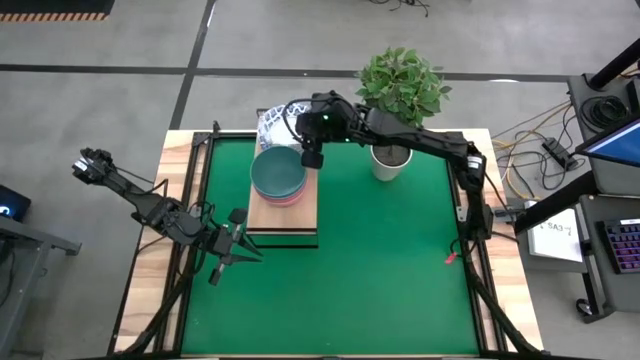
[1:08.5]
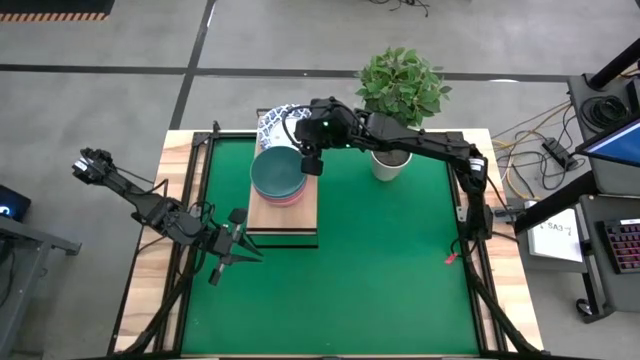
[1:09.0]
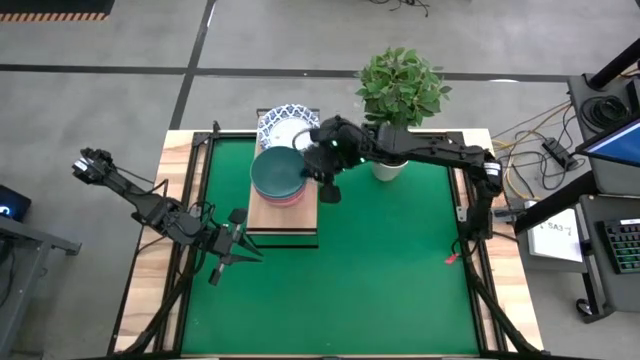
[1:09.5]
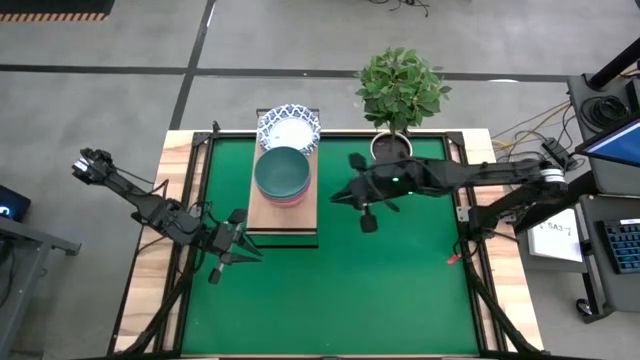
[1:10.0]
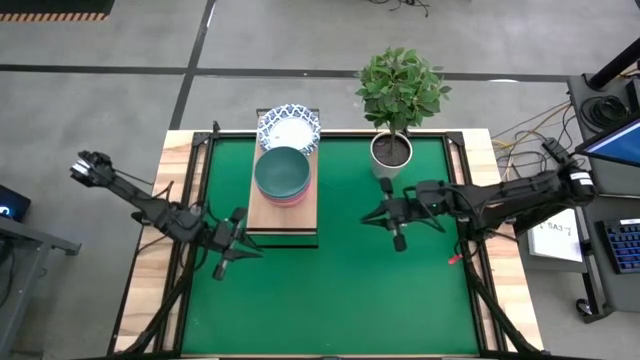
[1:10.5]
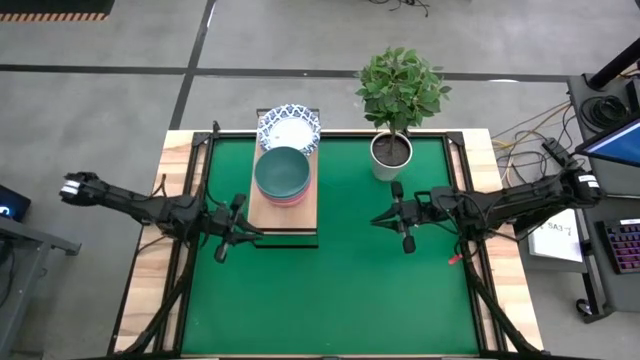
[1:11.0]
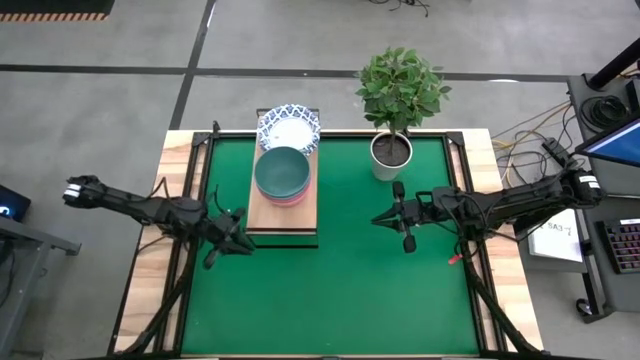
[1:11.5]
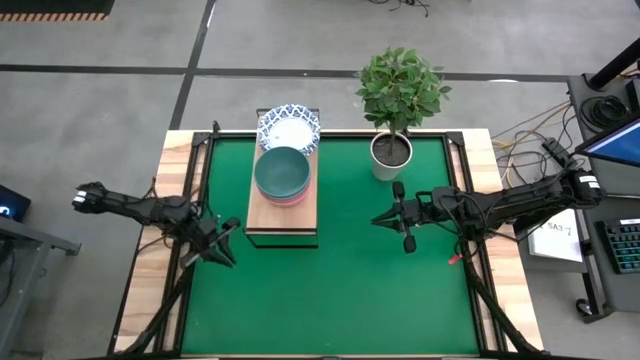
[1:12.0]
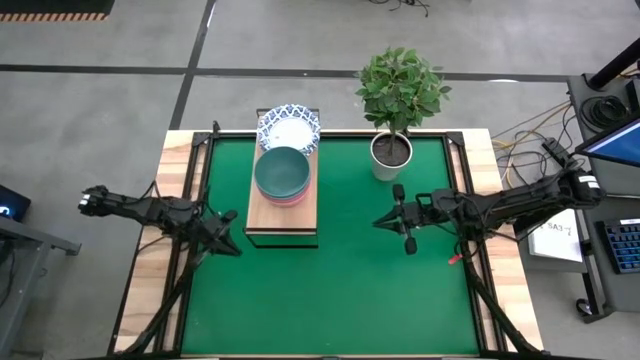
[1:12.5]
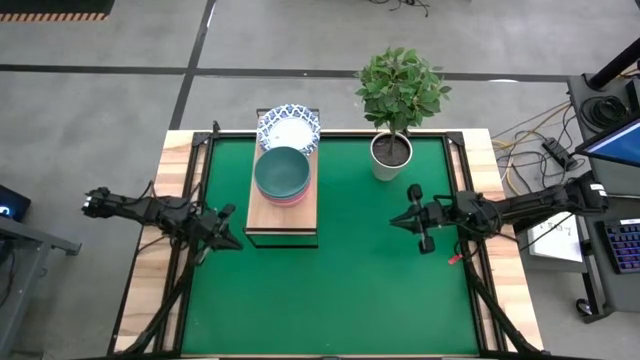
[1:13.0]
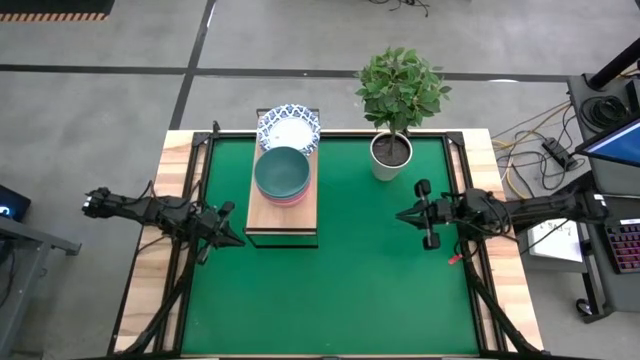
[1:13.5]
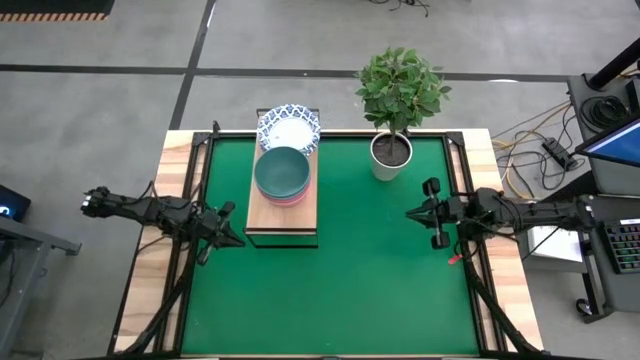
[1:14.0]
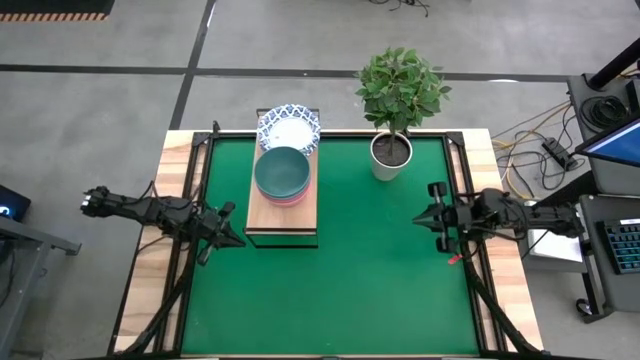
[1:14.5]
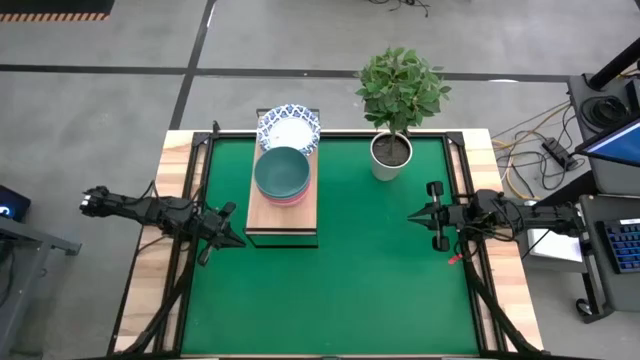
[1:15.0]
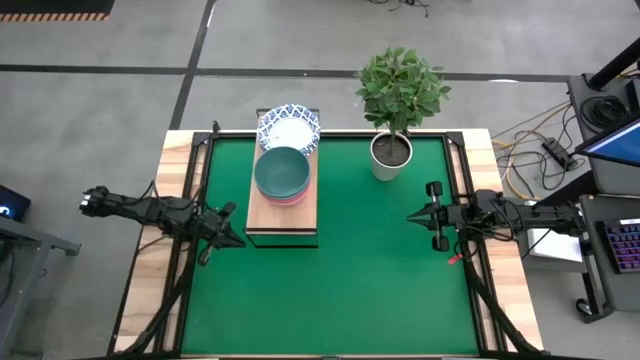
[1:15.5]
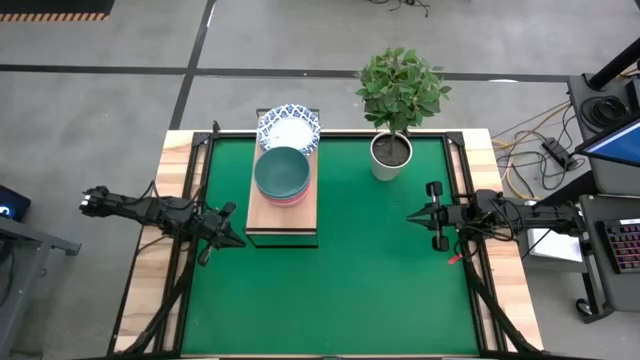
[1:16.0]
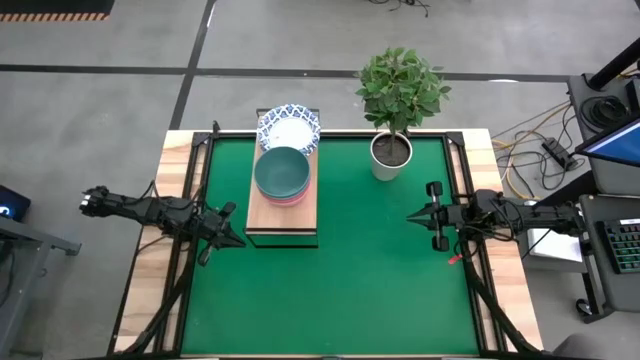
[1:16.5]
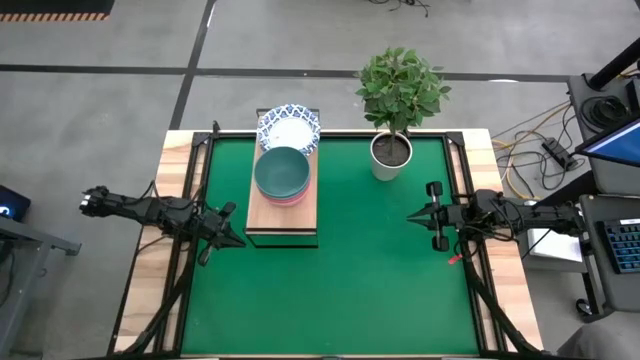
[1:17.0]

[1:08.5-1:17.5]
Task: Place and stack bowls onto a shelf
Return to Home Position

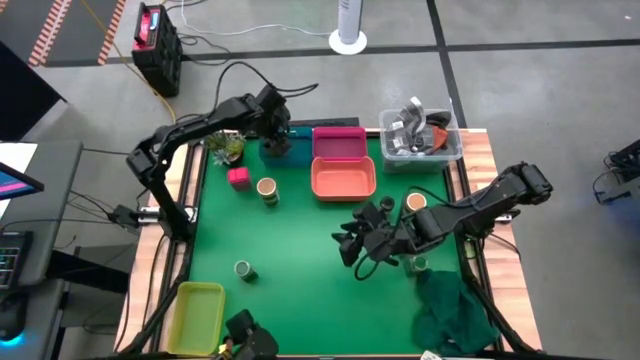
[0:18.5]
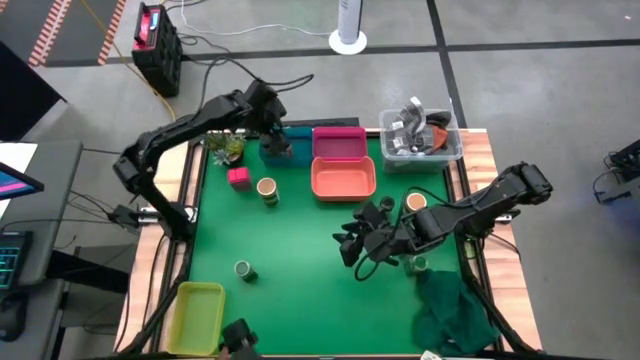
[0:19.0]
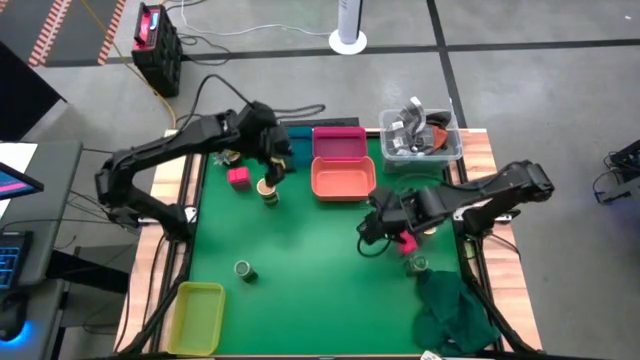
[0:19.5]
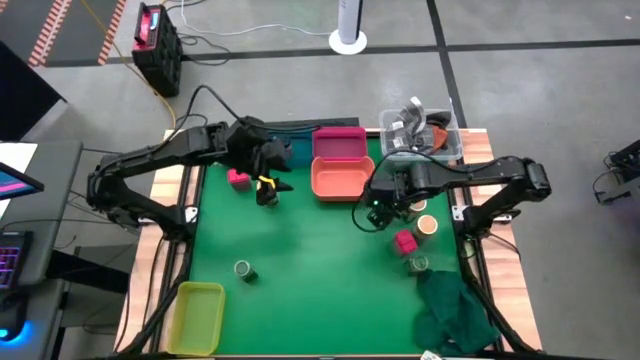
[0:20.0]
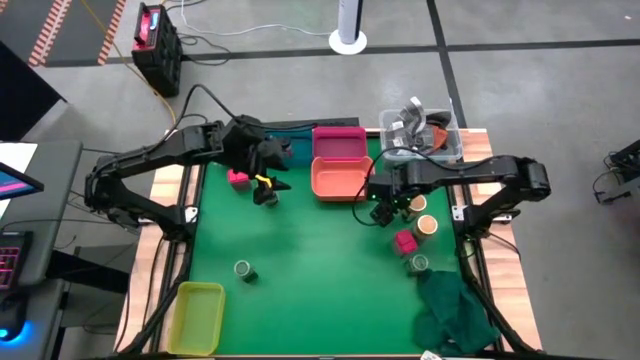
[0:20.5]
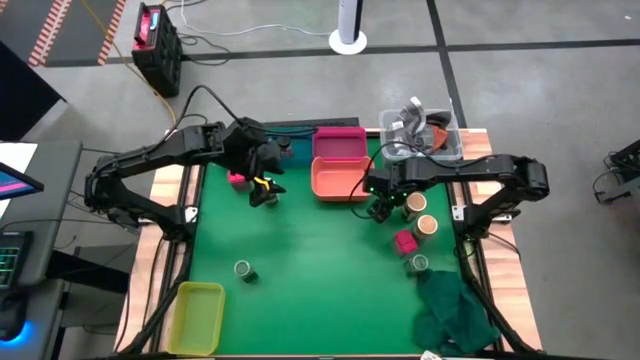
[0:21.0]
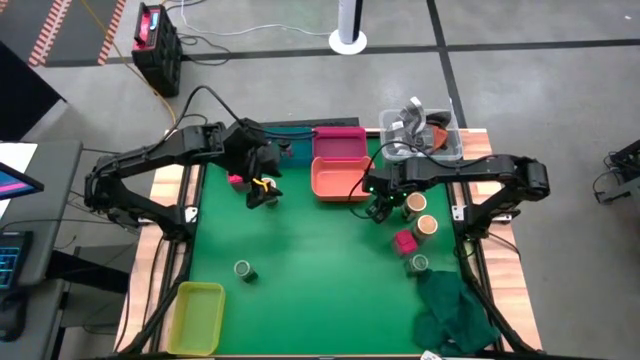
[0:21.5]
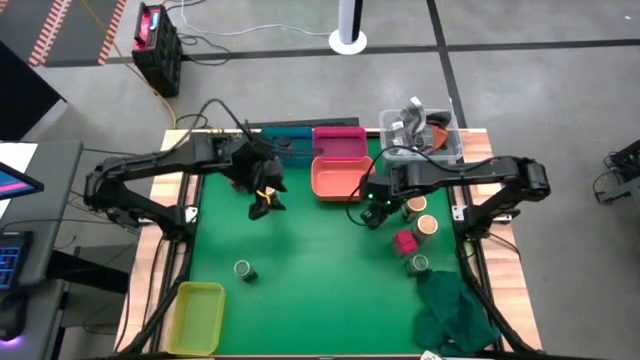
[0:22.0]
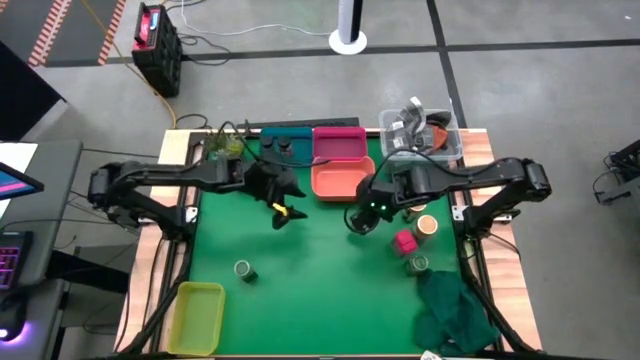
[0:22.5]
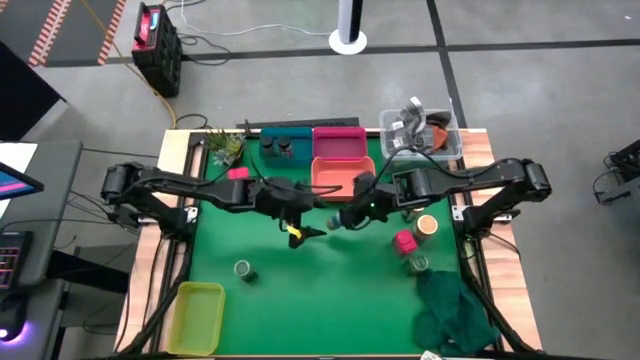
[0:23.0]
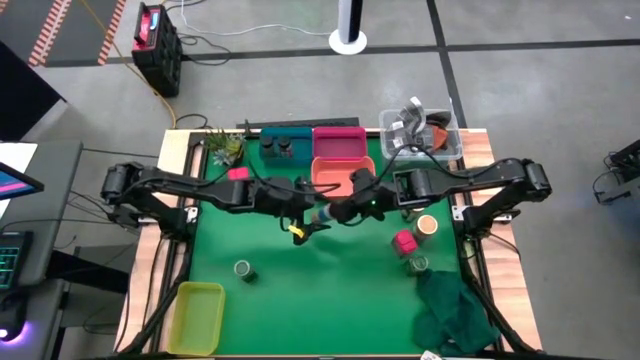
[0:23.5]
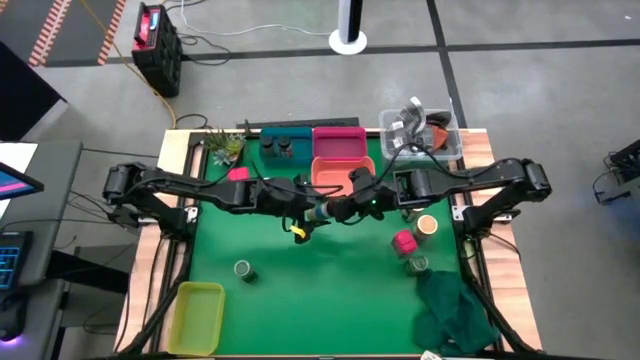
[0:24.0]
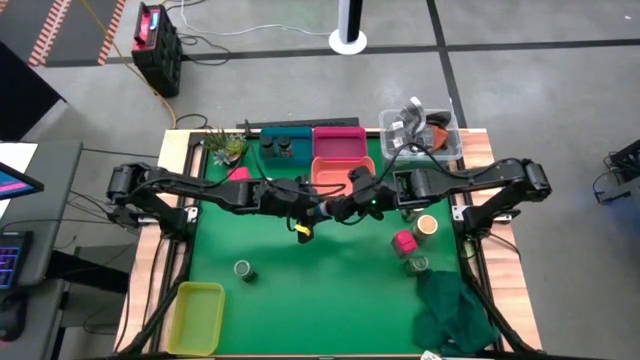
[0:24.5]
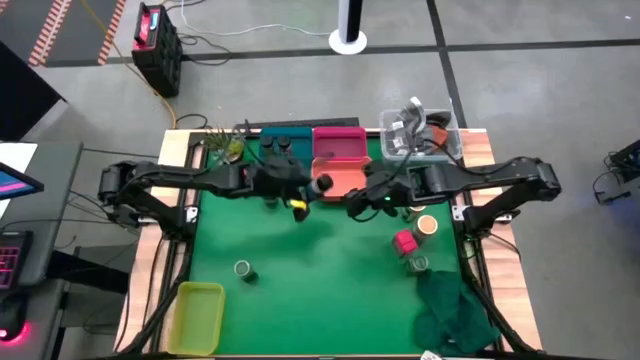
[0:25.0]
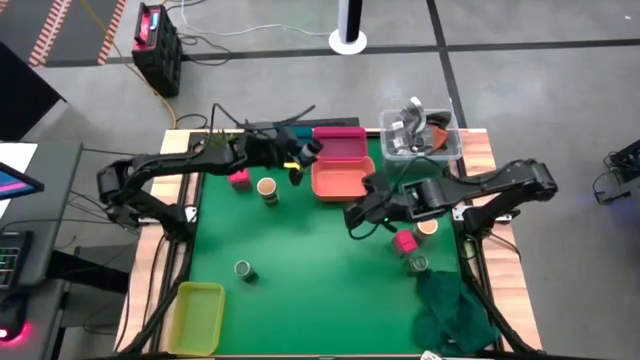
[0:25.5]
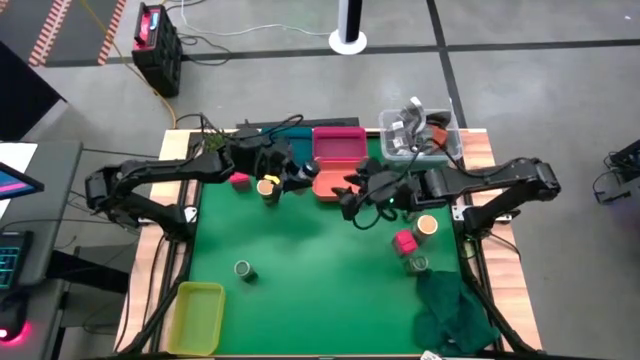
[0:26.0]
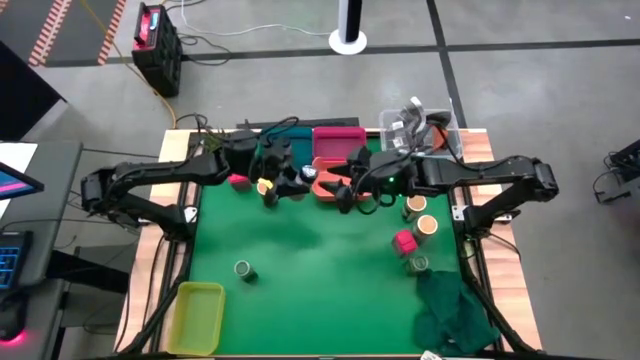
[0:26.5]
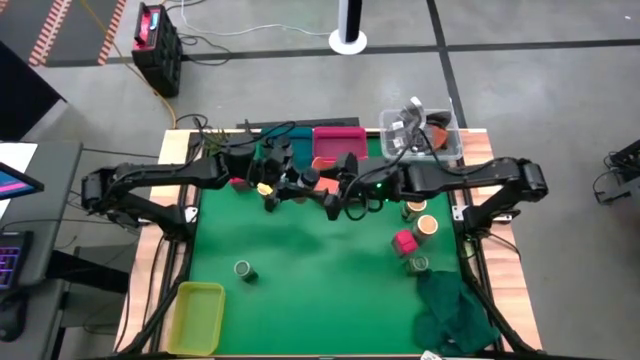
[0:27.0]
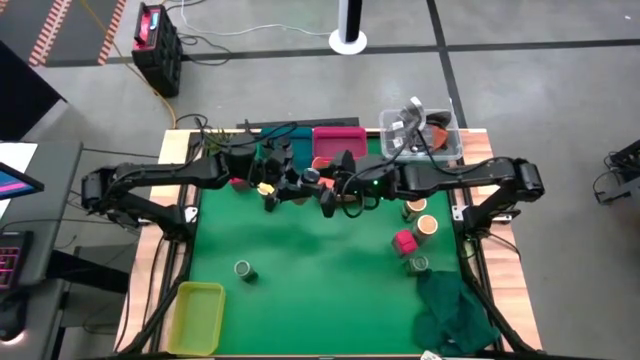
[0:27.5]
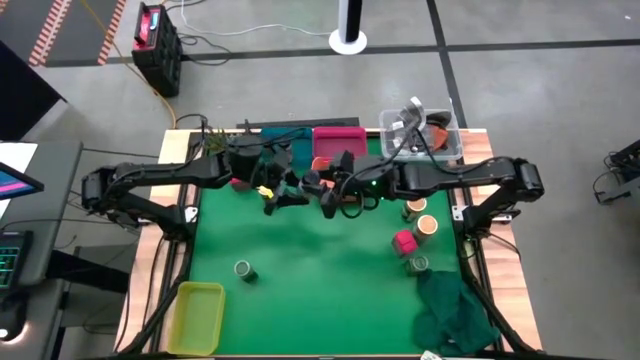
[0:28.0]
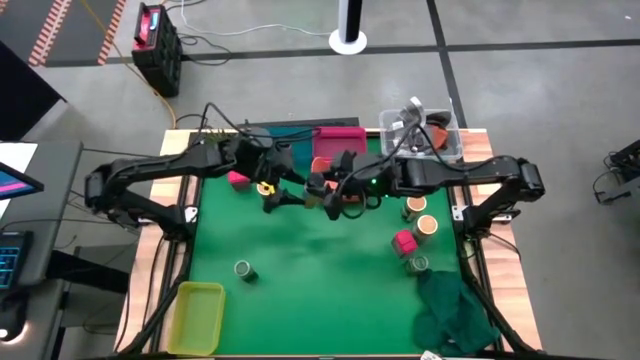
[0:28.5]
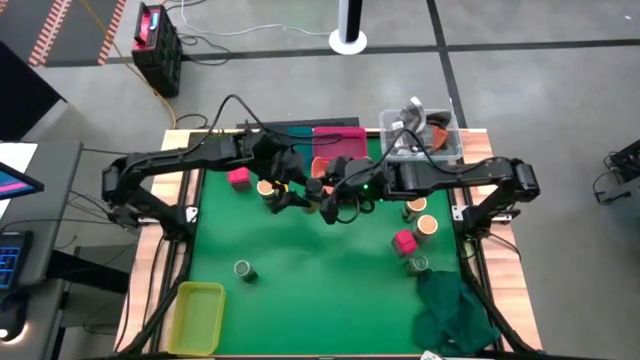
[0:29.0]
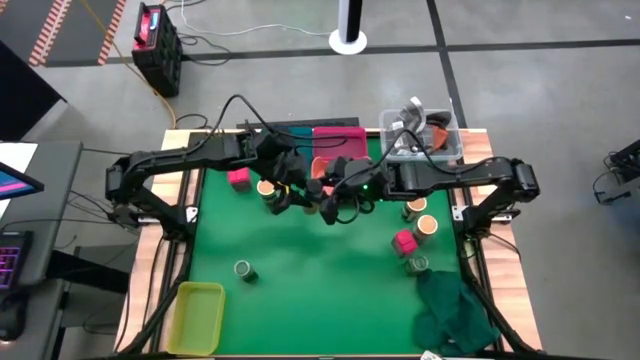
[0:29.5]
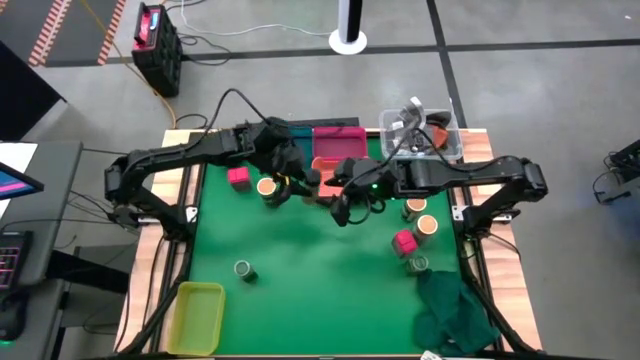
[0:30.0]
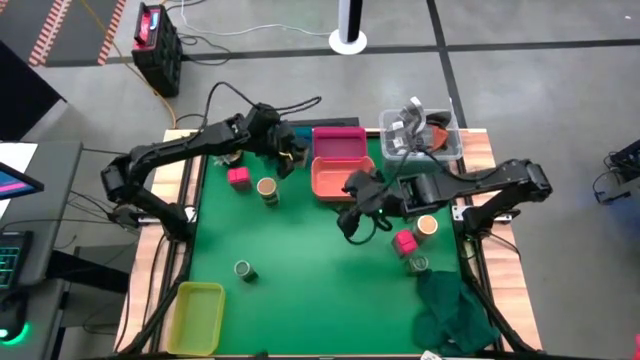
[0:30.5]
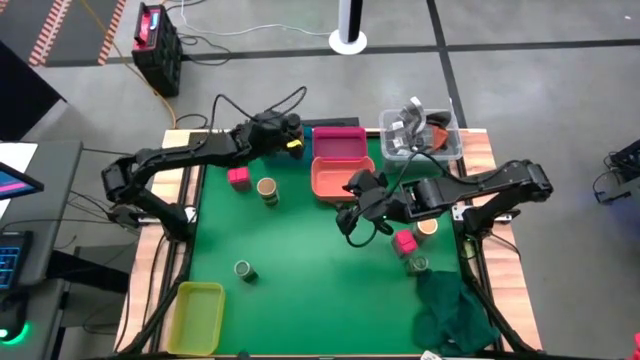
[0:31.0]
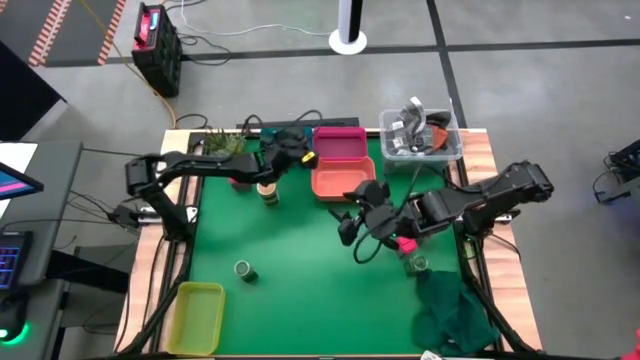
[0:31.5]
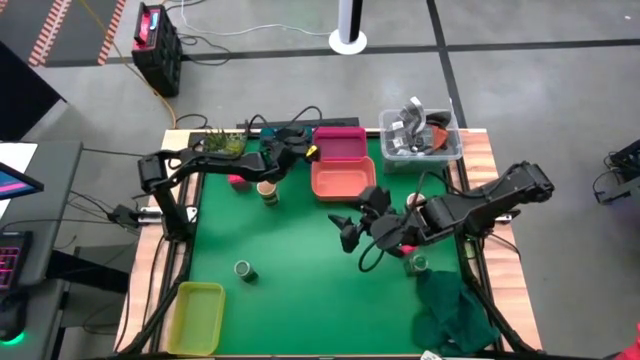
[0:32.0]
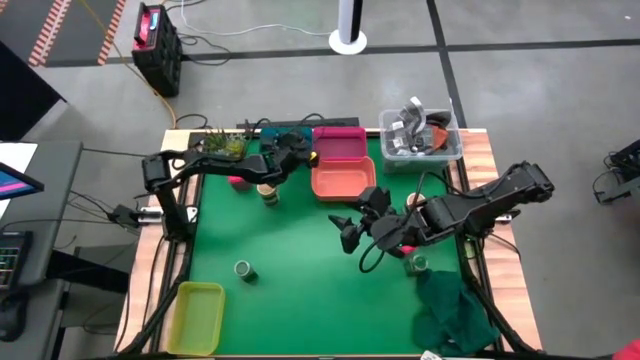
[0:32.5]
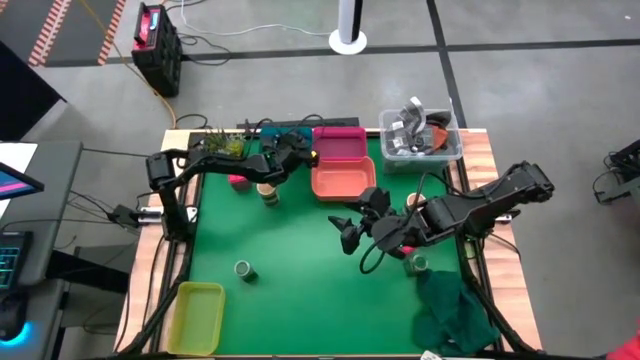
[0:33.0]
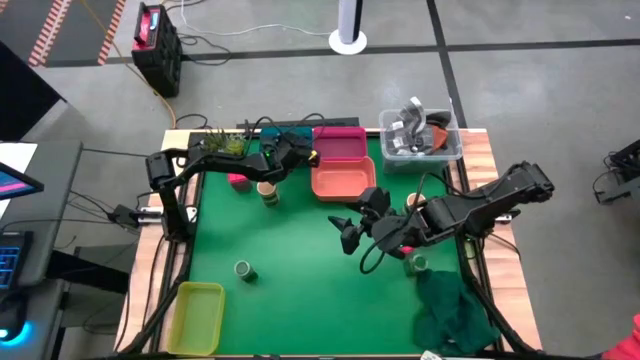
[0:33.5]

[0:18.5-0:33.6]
Task: Sort spices by type
Put the black seasoning bottle into the blue bin
